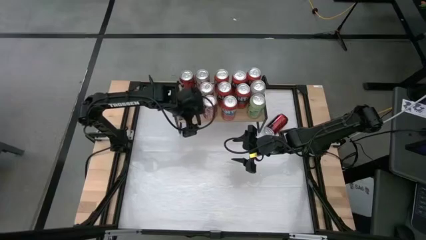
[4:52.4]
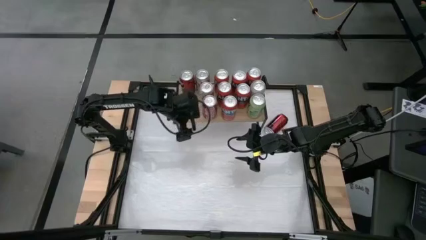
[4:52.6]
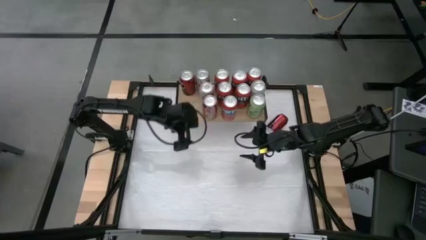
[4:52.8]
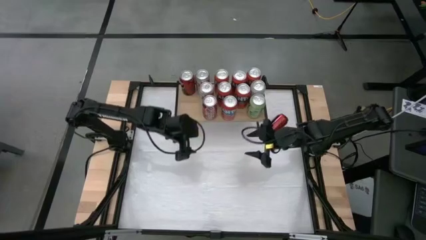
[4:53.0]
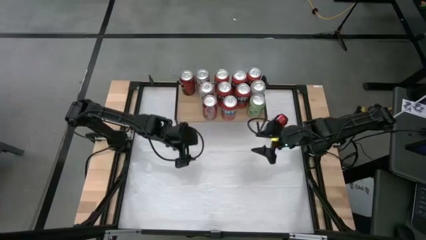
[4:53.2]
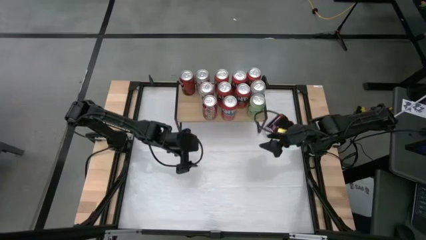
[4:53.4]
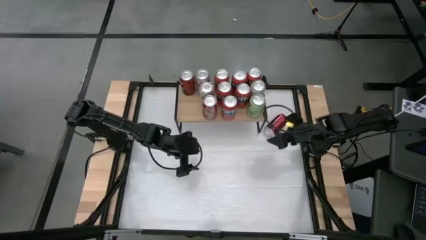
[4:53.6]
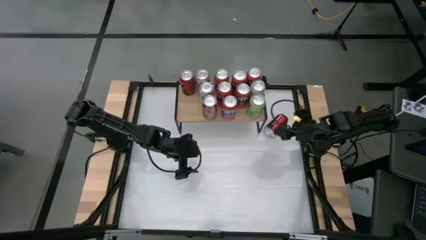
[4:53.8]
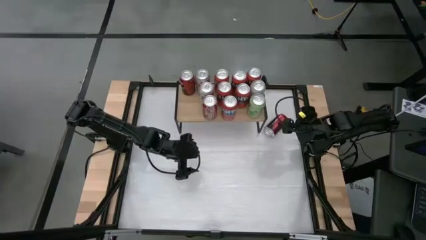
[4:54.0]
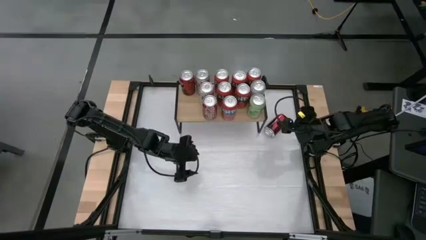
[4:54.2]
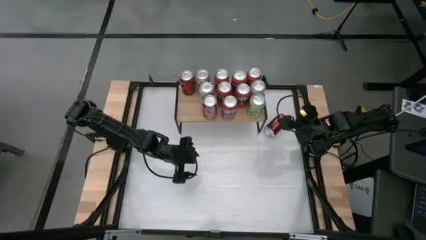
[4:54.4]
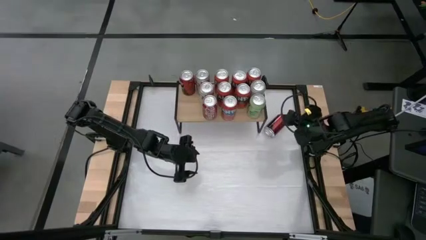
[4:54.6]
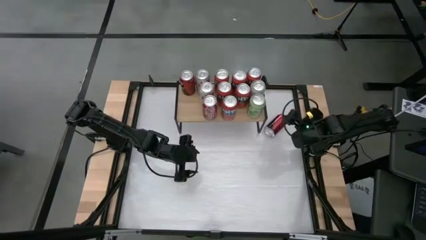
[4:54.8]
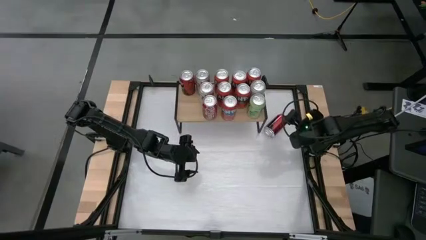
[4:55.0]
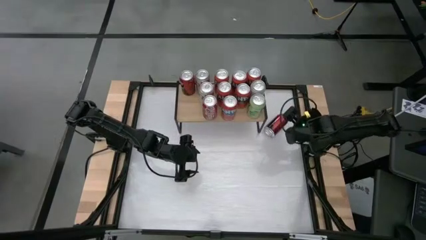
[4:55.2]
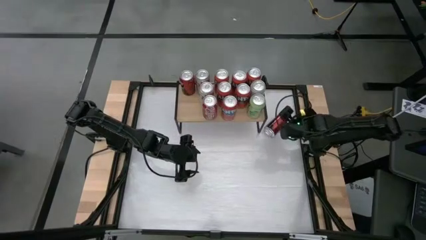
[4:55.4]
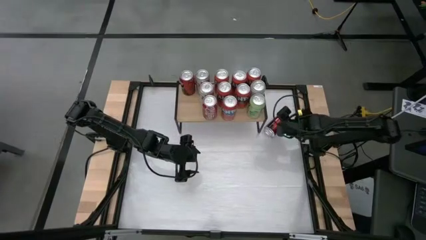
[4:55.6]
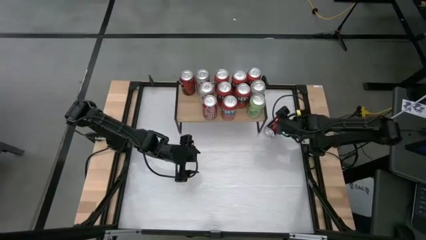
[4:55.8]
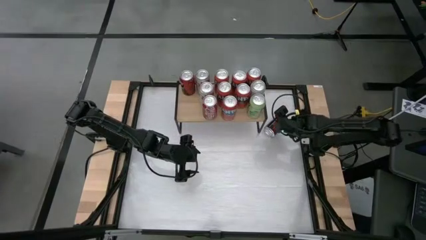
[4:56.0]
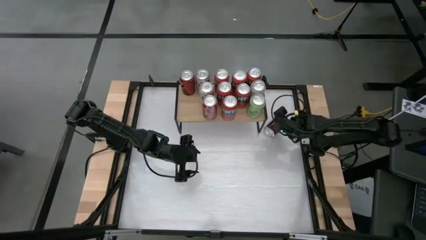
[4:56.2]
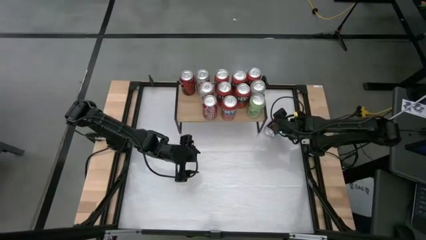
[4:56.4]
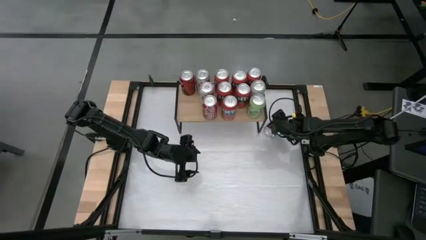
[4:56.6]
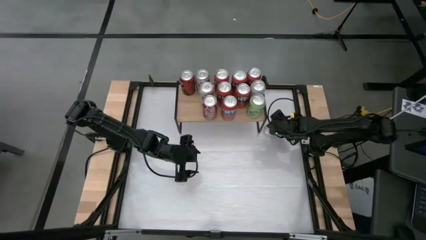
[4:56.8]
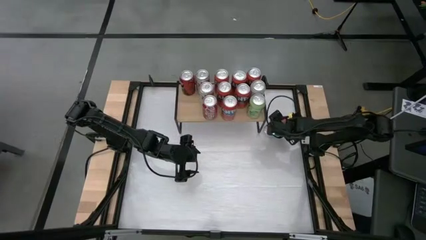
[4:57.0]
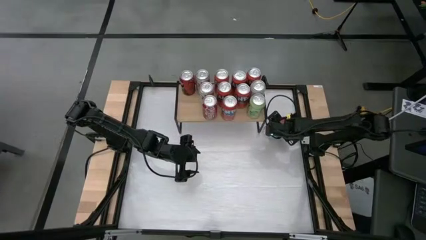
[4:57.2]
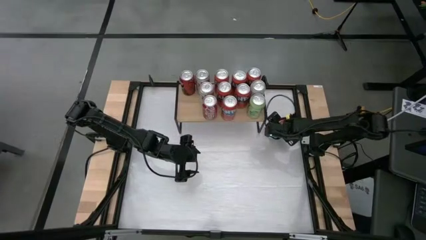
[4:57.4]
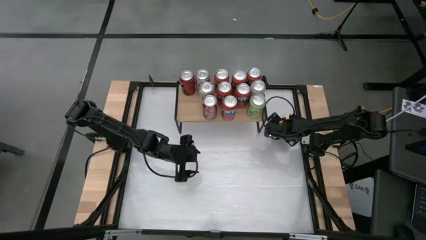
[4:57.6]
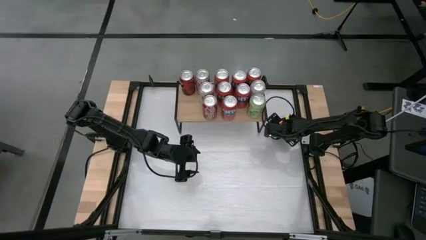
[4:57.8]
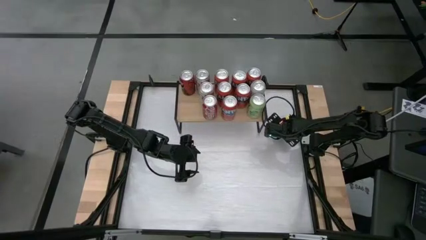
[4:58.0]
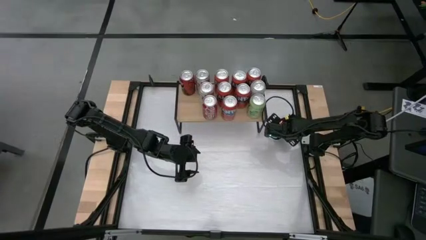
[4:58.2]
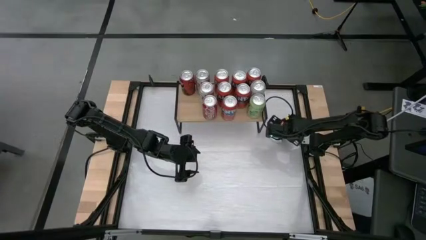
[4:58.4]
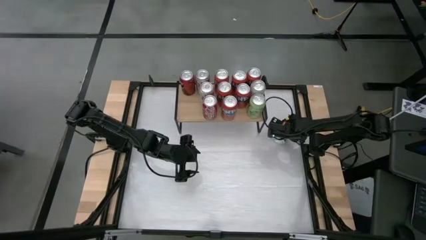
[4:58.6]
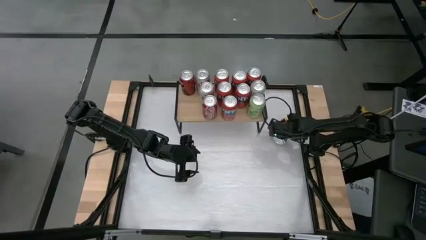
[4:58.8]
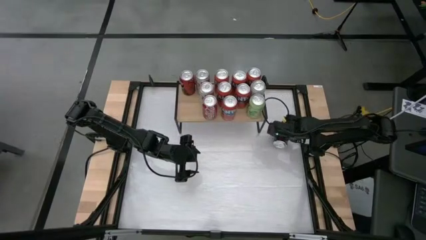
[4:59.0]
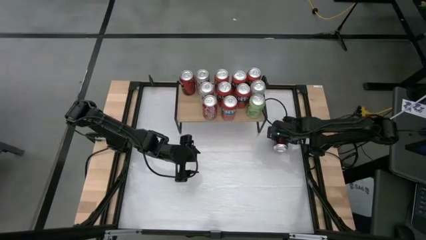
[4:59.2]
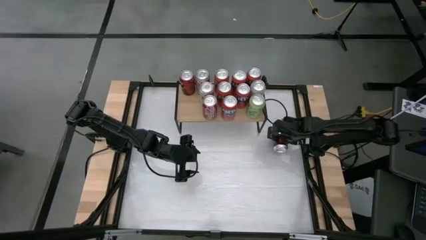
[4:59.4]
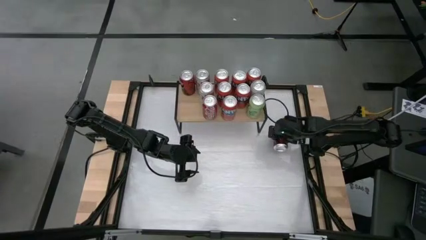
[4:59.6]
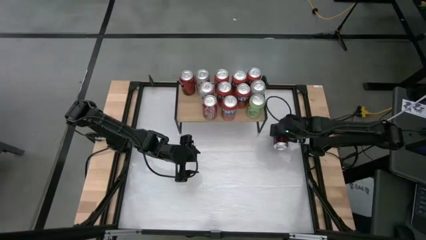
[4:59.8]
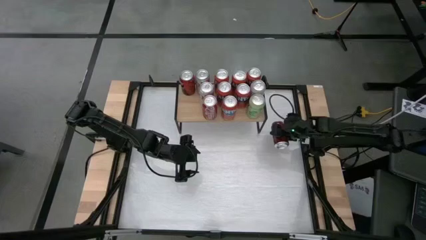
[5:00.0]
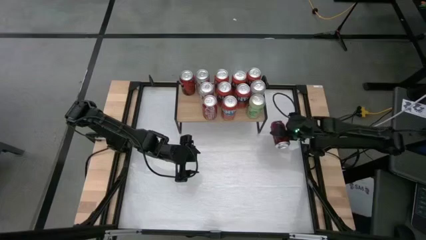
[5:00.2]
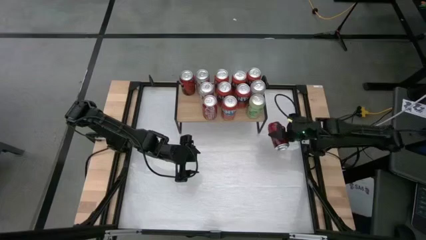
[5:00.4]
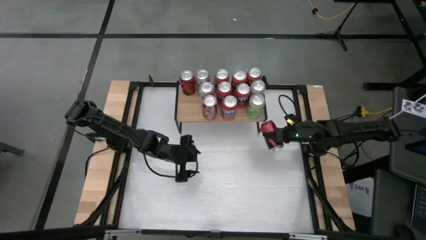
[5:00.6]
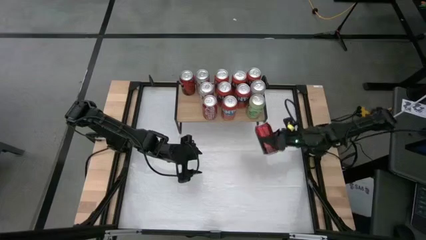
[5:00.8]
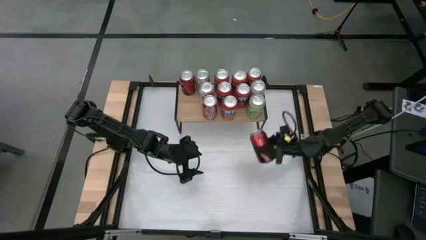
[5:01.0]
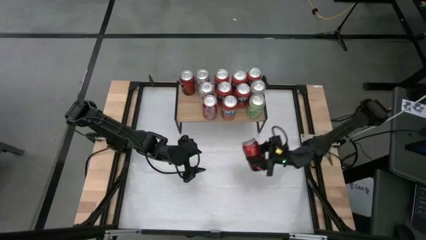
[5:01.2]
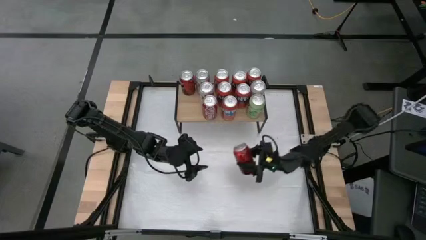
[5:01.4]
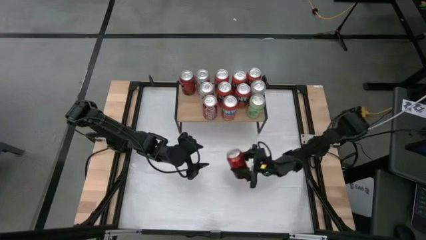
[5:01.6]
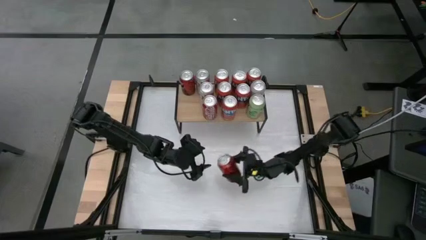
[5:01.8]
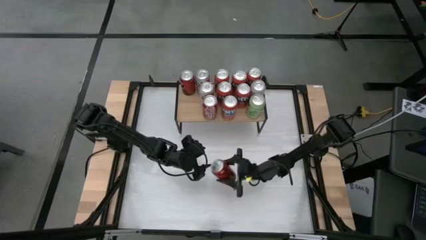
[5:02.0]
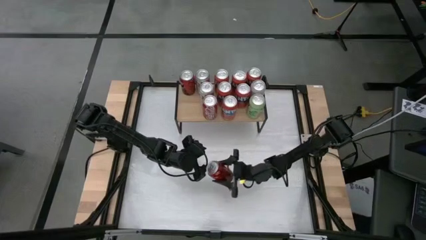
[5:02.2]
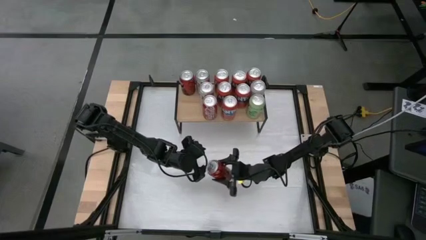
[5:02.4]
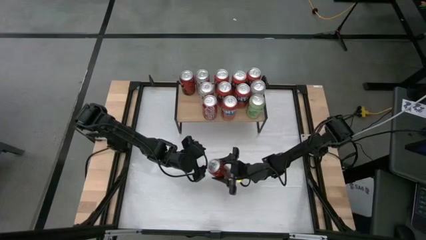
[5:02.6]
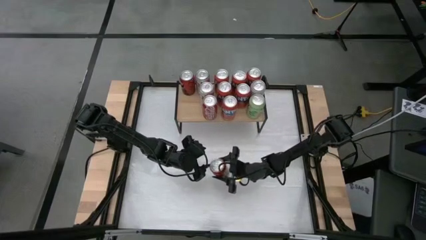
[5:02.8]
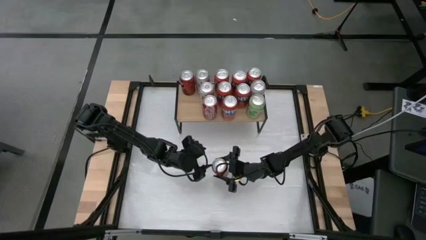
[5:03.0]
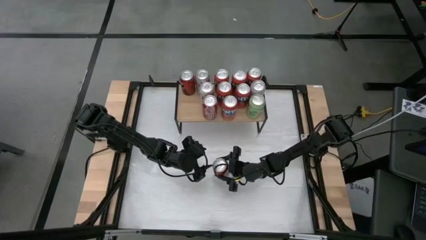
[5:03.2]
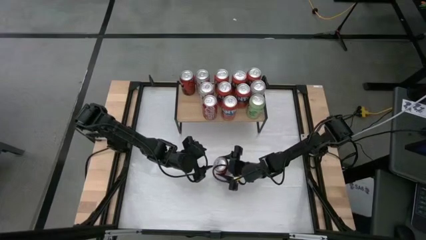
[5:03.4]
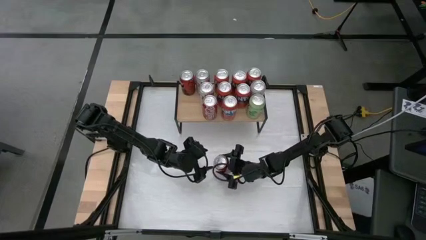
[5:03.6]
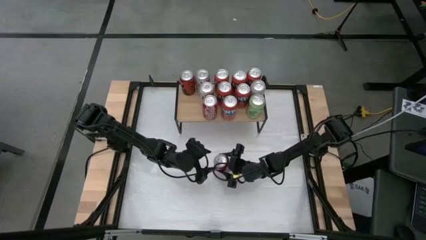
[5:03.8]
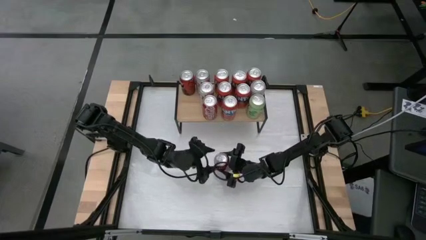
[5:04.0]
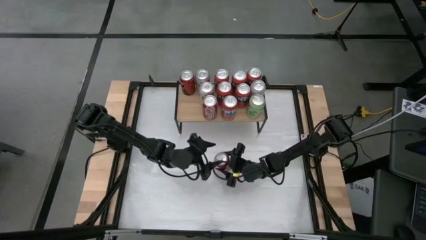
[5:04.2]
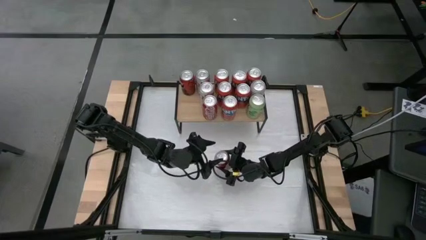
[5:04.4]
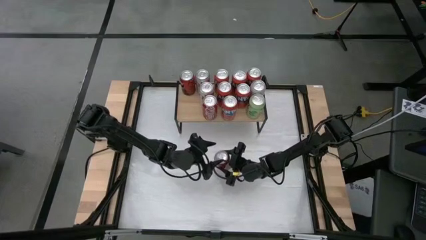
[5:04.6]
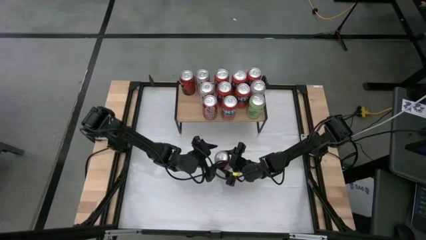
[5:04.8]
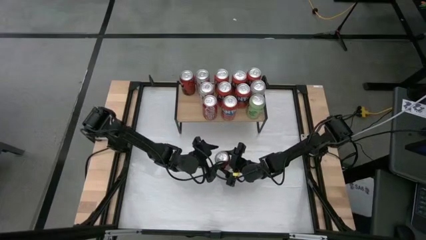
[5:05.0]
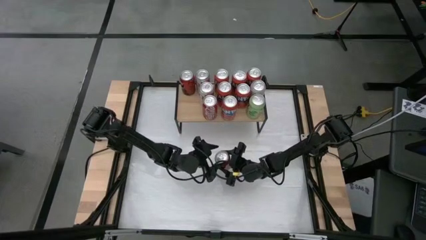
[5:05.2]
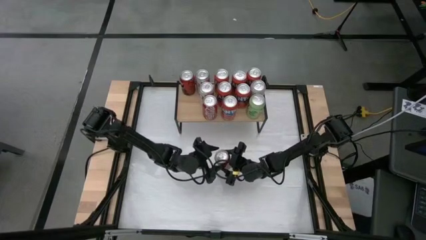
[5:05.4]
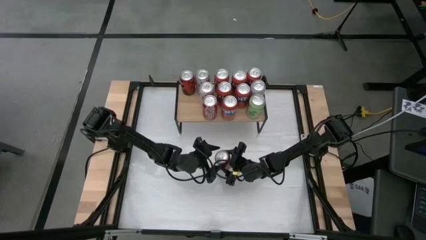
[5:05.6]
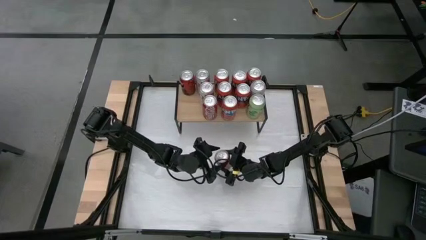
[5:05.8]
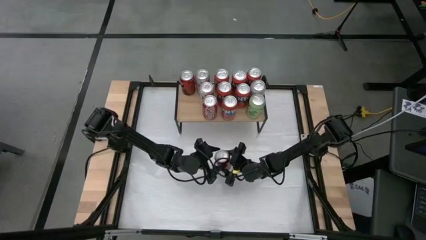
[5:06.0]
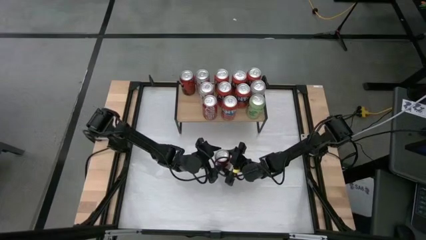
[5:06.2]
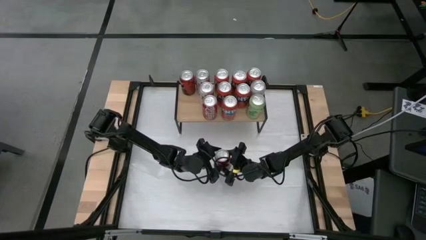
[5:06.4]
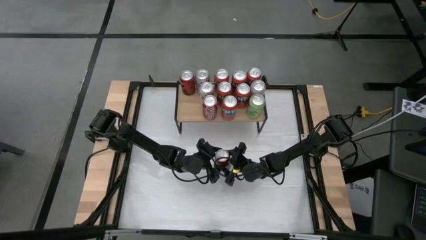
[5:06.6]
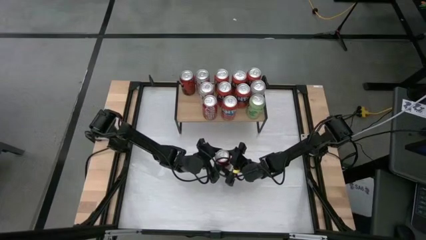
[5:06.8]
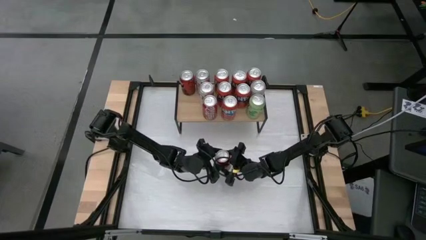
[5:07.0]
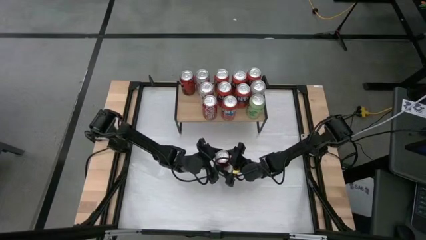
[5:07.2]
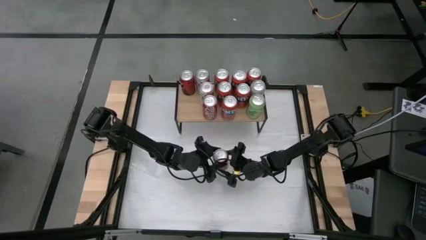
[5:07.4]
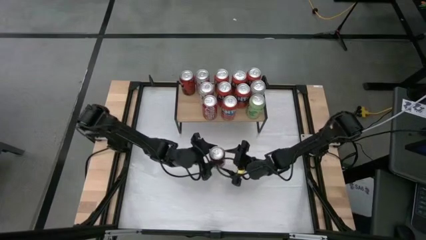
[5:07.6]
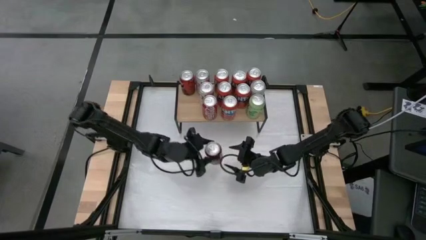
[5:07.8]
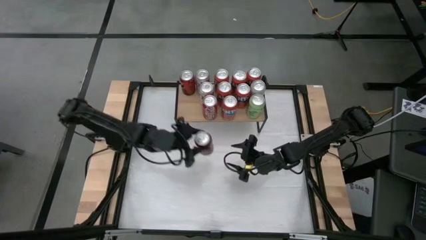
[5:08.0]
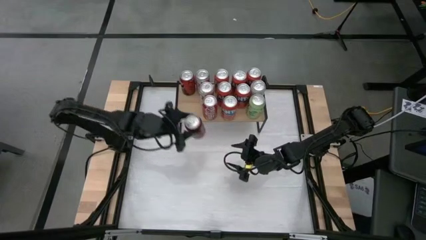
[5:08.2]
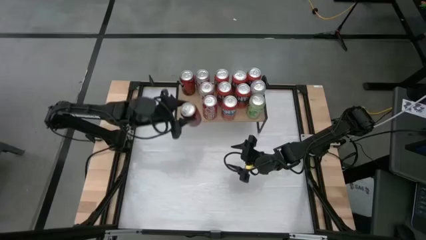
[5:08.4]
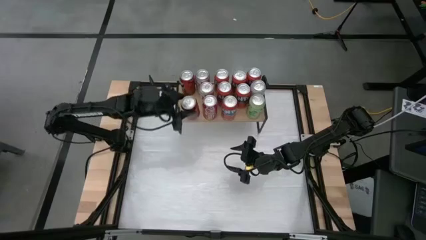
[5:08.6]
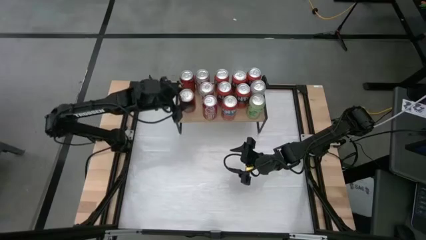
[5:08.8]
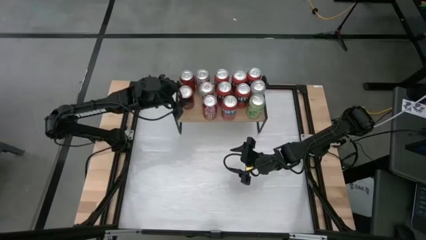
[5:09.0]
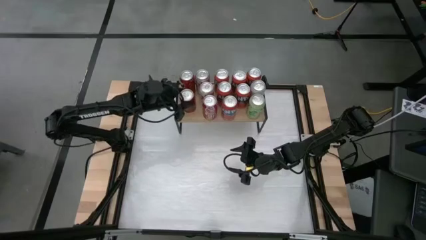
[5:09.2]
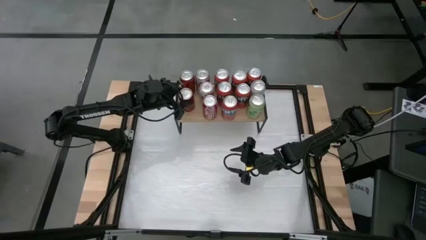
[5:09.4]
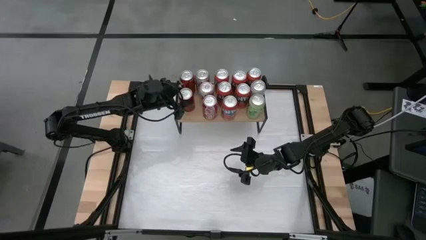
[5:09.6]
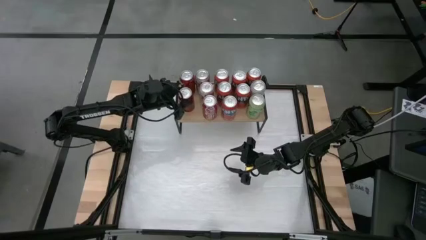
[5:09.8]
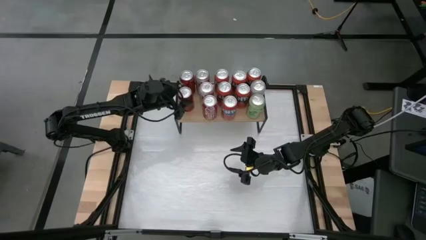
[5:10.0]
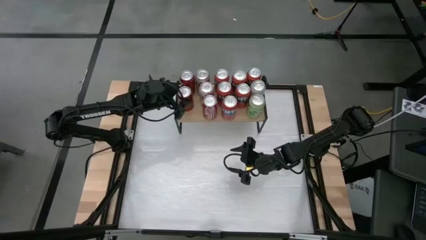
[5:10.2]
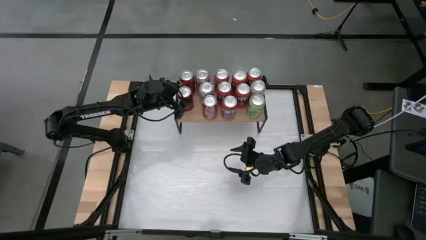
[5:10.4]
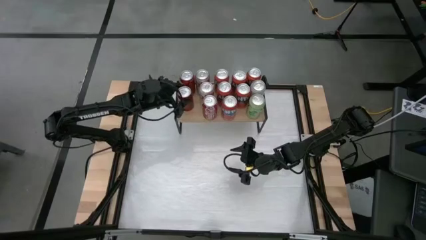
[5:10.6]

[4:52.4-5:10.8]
Task: Place canned beverage on shelf
Put the red black soda can on the shelf aligned with the other red black soda can
